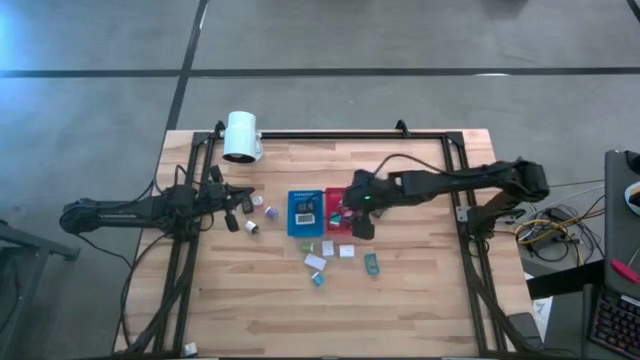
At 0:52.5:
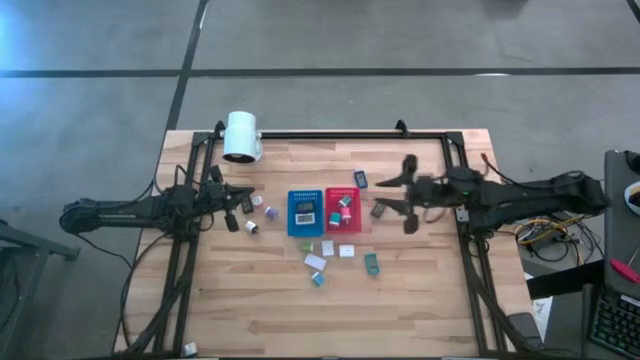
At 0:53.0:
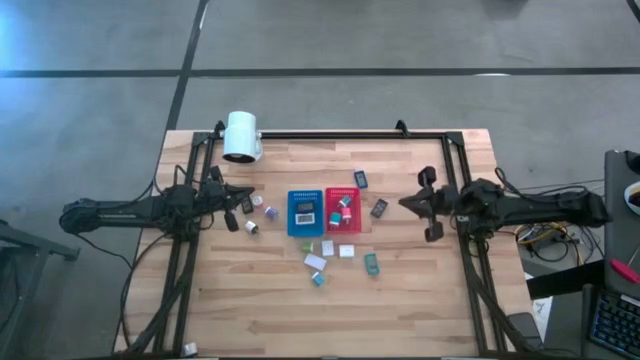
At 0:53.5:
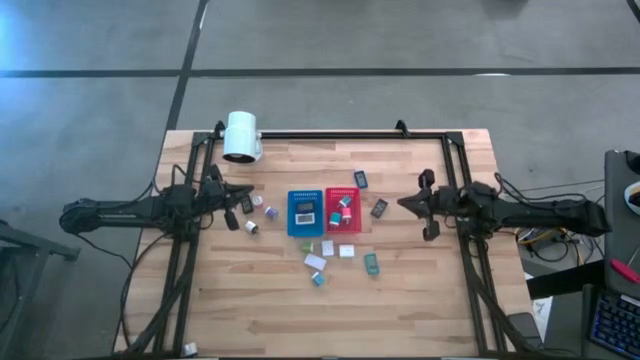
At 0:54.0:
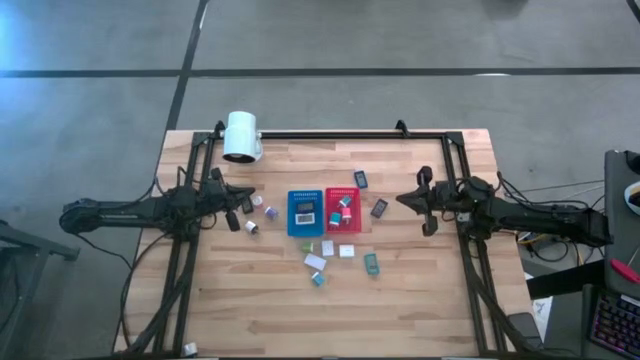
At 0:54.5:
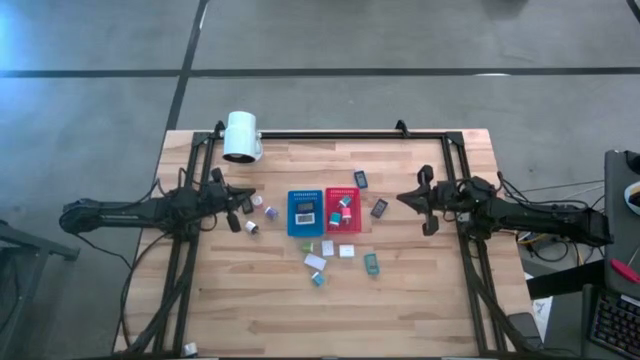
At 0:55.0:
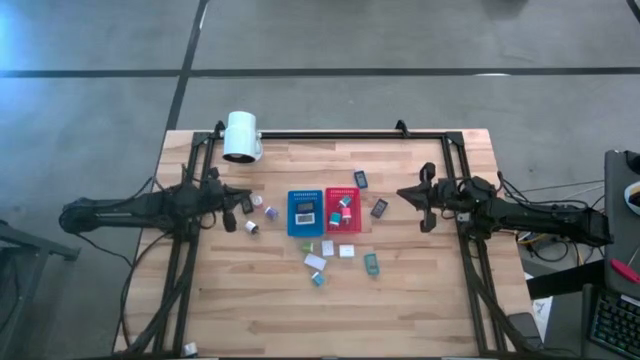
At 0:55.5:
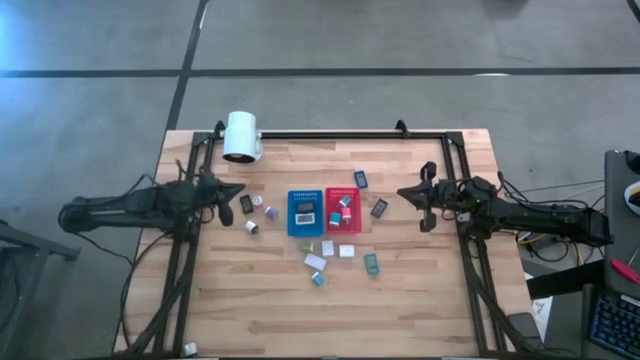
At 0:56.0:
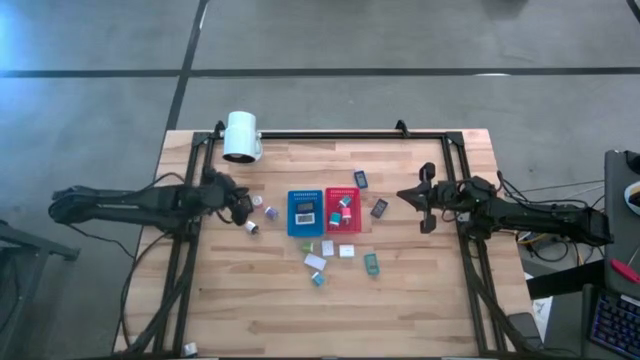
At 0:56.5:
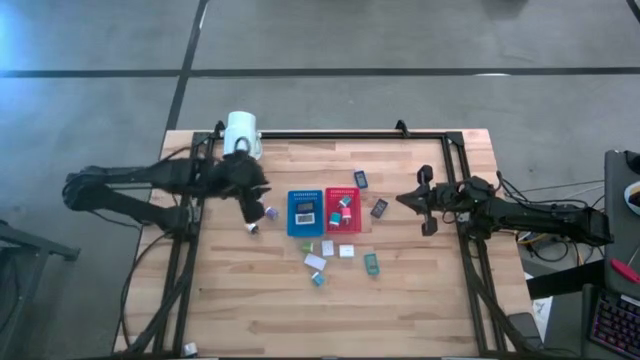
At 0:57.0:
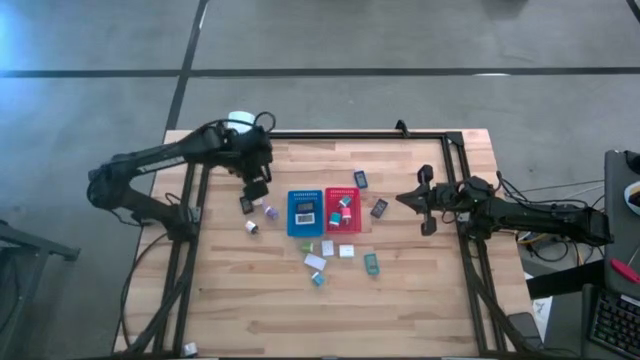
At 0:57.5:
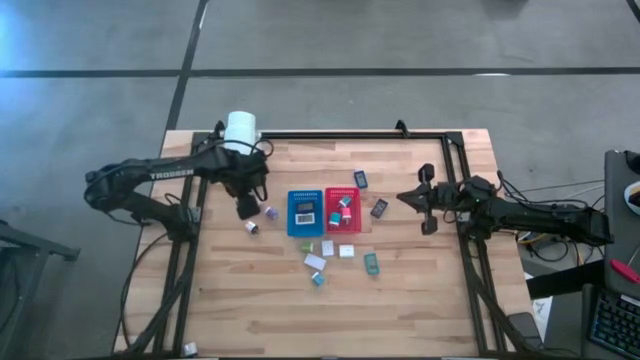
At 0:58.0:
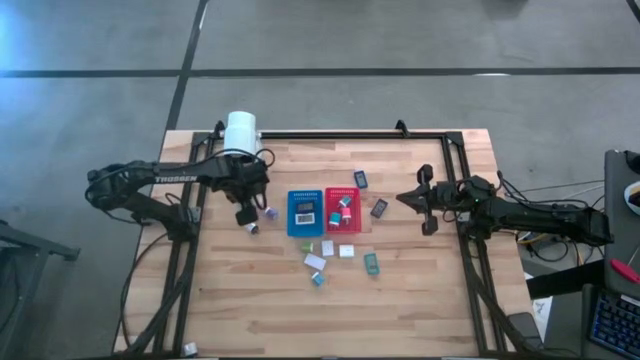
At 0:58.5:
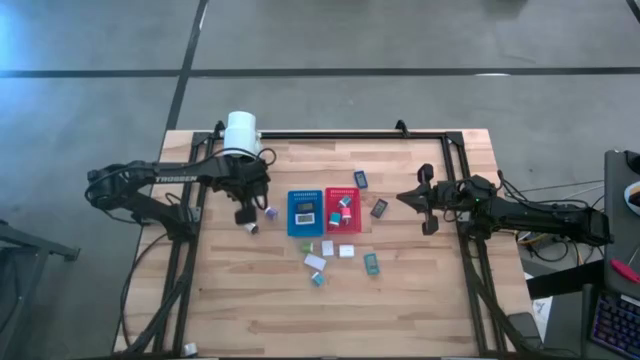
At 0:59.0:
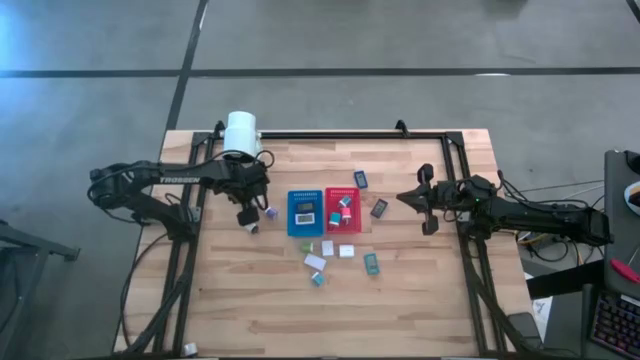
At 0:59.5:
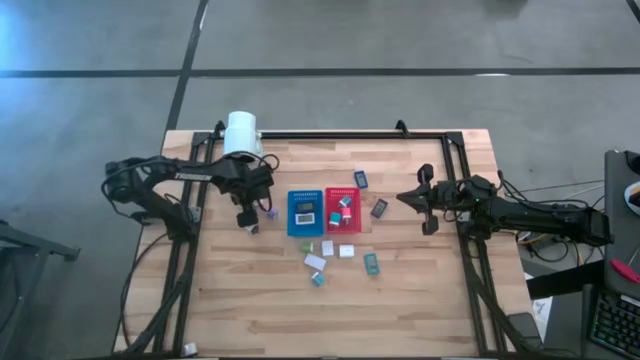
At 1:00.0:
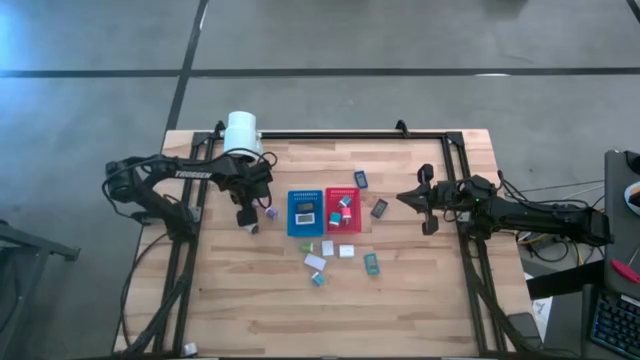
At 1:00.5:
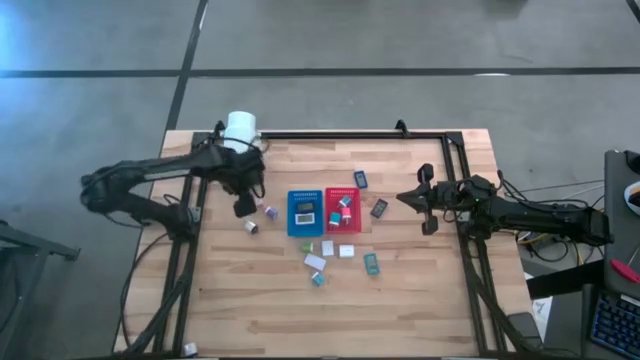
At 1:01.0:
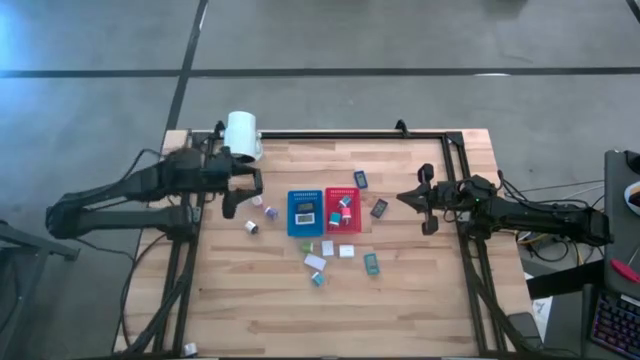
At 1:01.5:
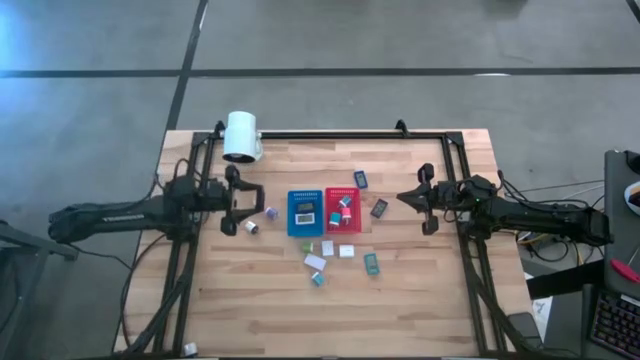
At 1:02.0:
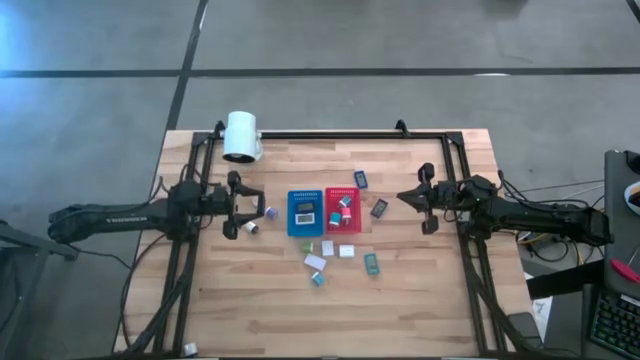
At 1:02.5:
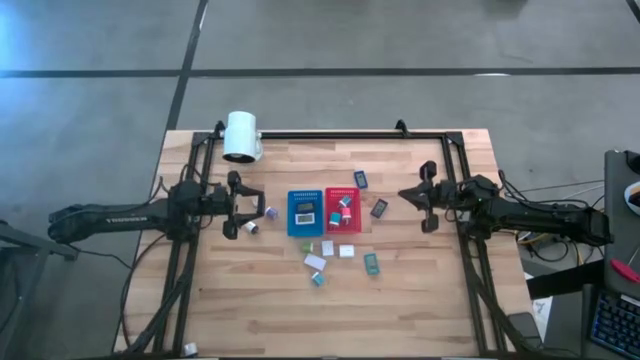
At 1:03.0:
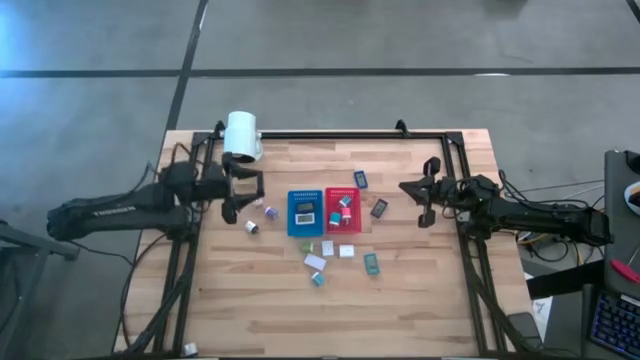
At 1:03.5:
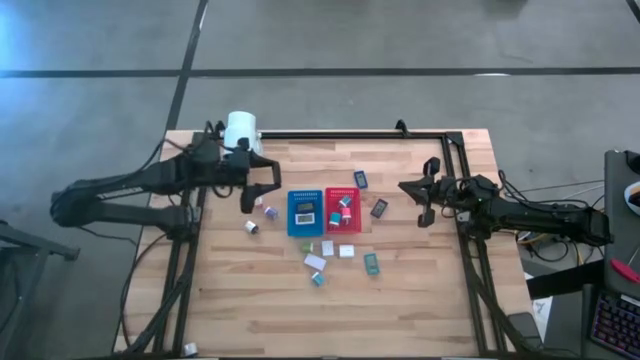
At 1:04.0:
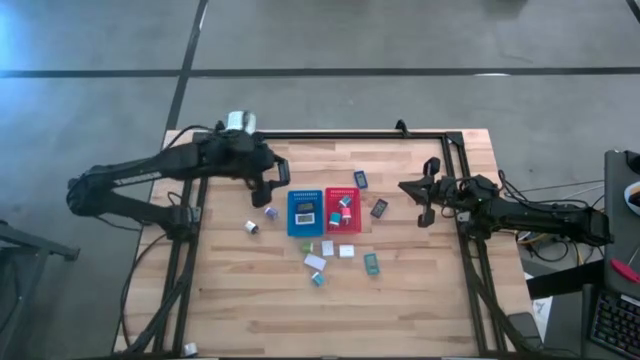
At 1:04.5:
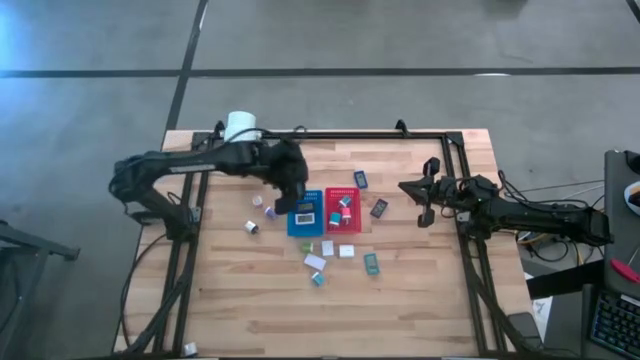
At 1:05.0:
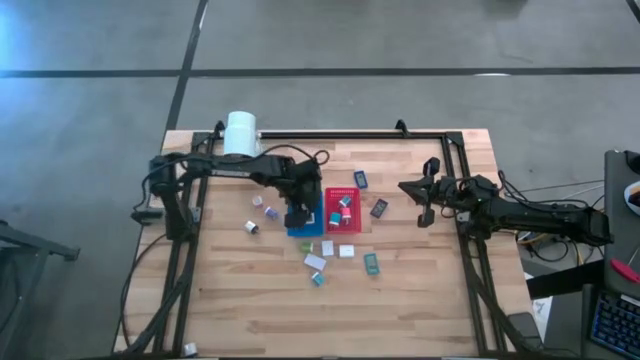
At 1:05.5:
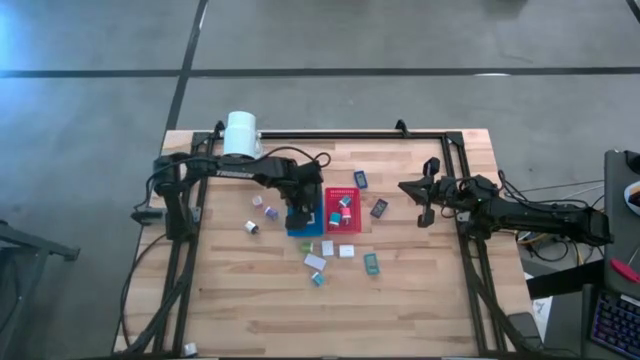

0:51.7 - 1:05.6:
Task: Pick & Place Office items
Put the digital timer into the blue bin

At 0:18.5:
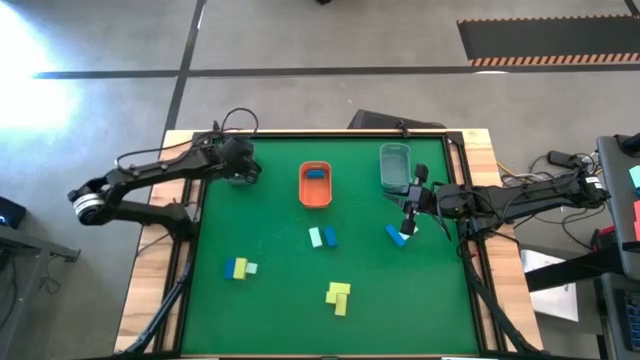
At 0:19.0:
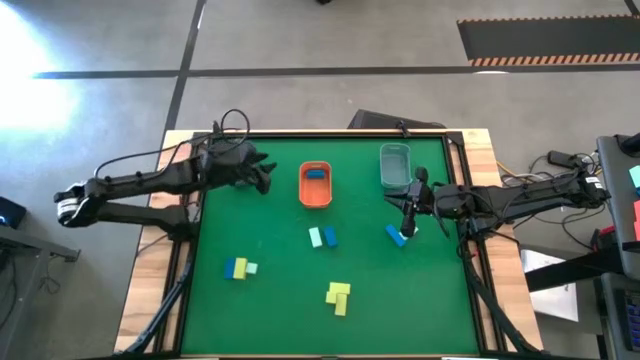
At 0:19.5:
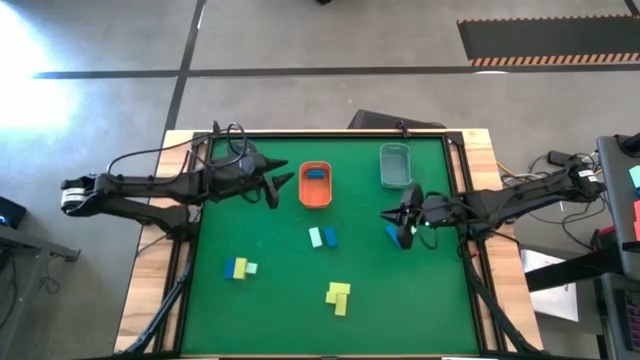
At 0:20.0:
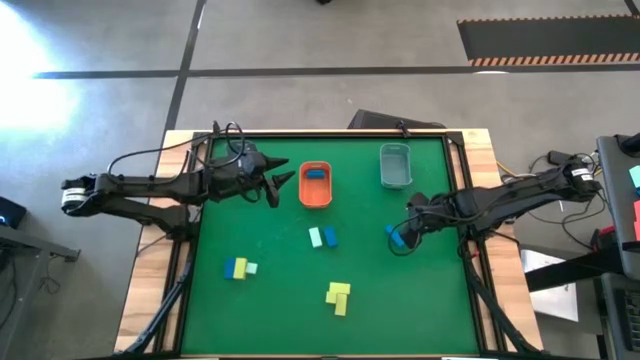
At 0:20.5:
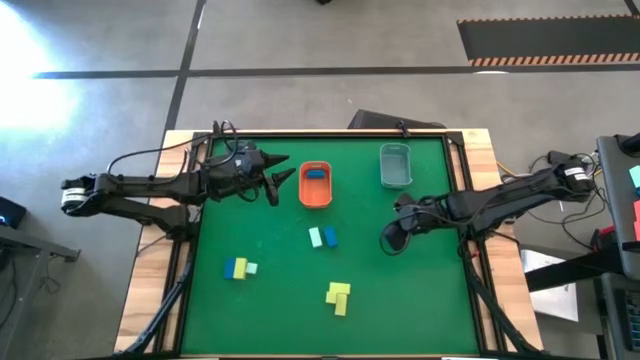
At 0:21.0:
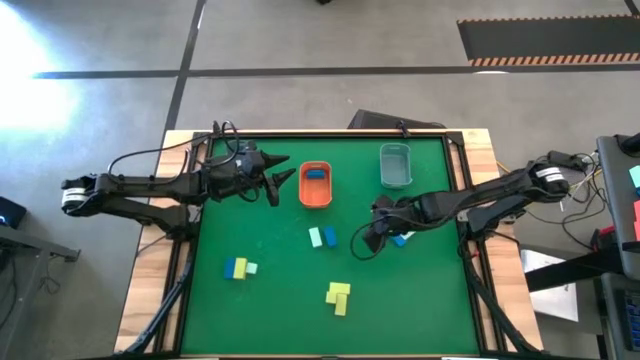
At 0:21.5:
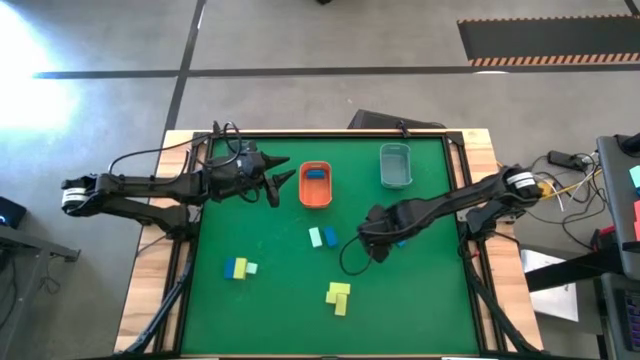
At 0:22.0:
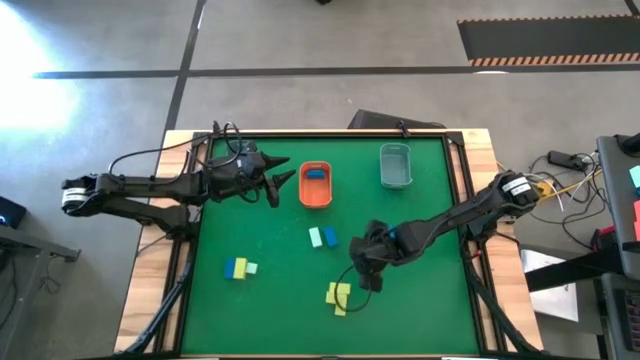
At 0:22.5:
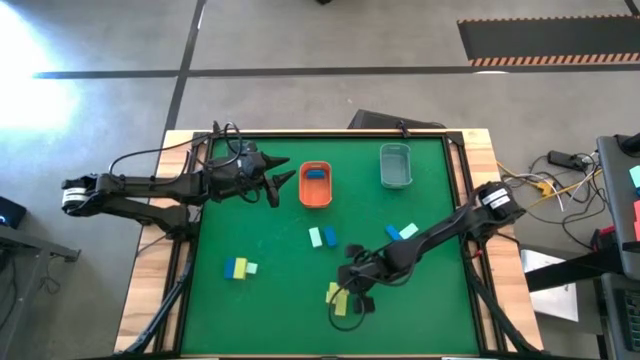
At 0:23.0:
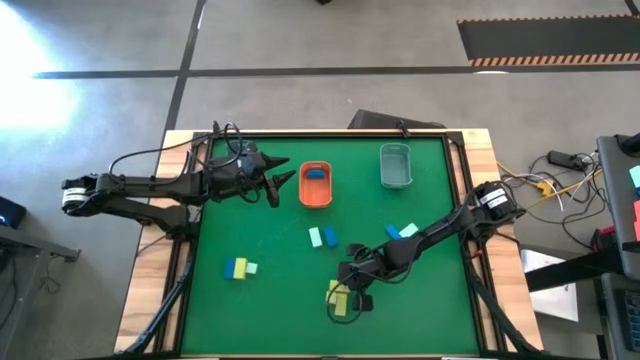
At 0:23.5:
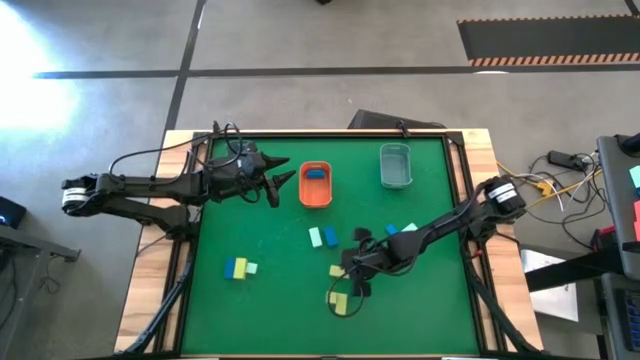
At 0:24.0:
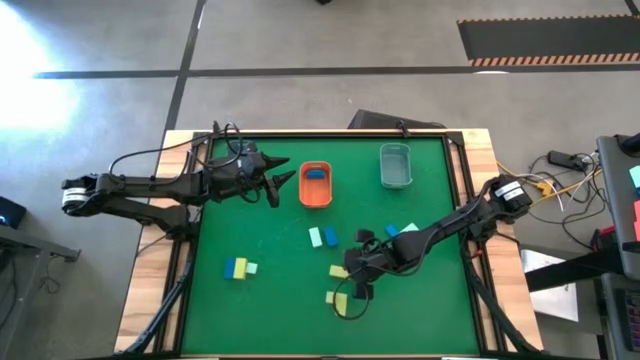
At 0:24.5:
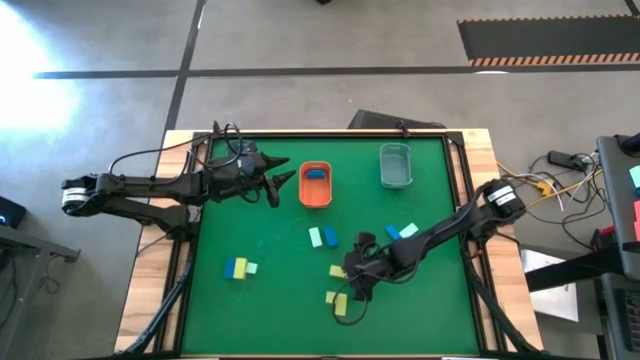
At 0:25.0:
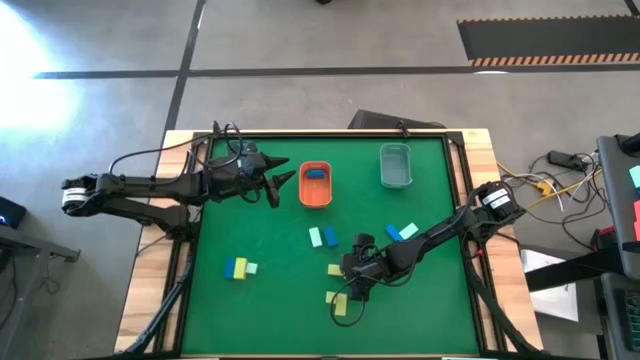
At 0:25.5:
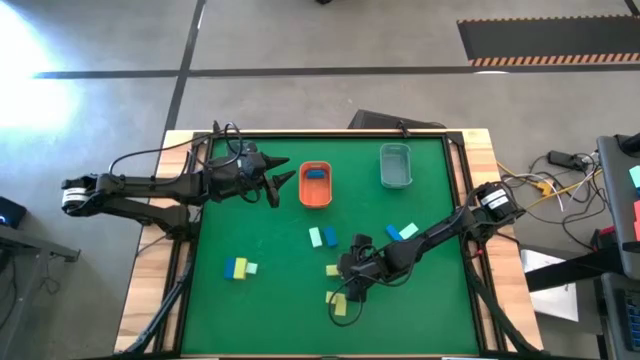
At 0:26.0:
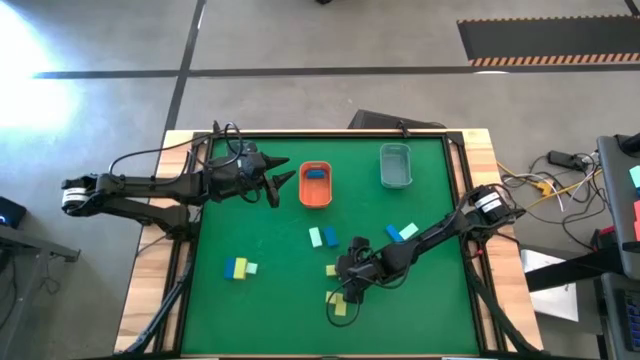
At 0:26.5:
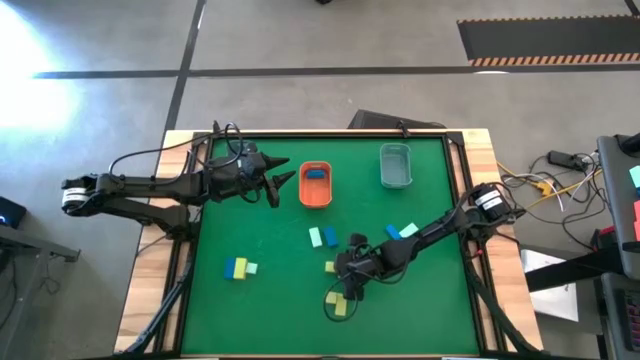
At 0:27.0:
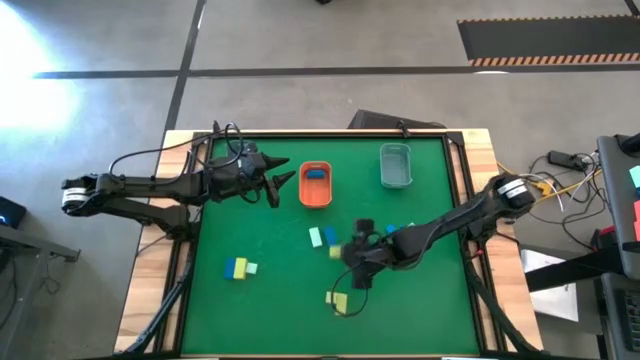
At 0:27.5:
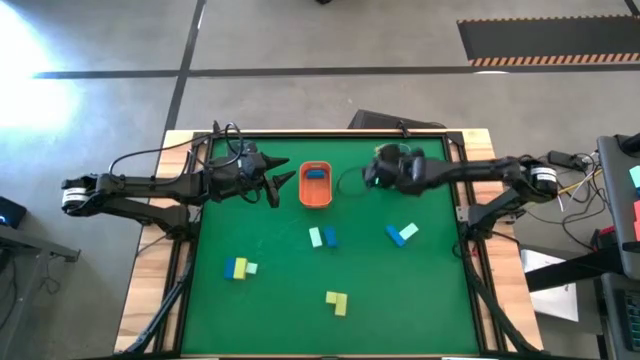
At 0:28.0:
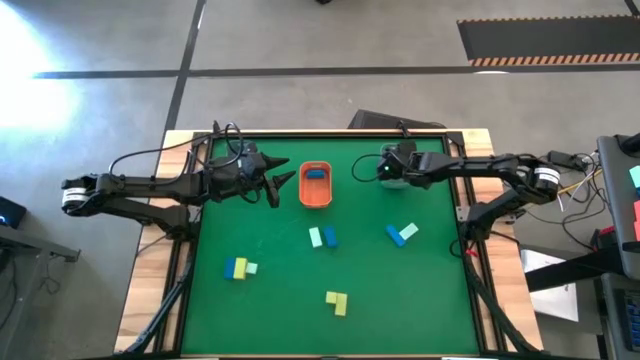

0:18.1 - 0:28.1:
Task: Sort & place blocks by color
Put the yellow wooden block into the green bin
